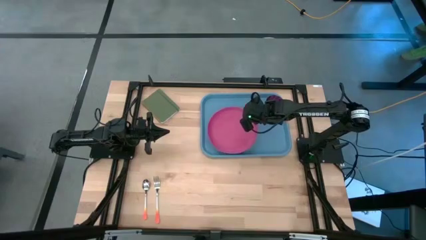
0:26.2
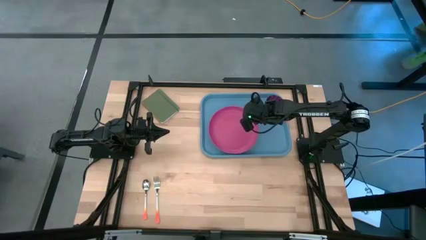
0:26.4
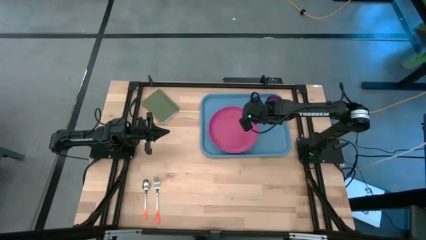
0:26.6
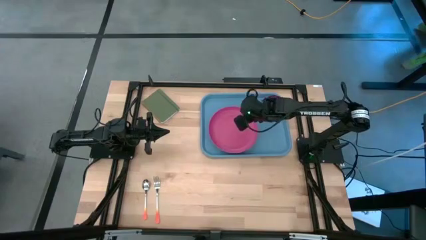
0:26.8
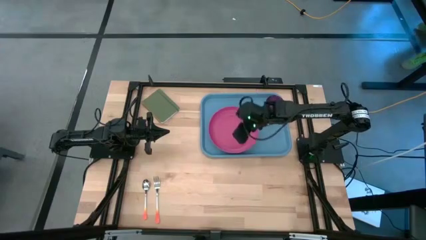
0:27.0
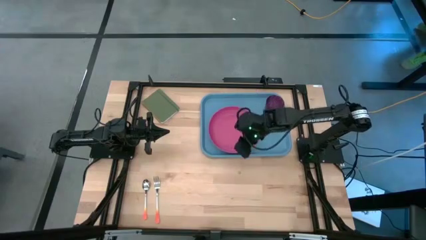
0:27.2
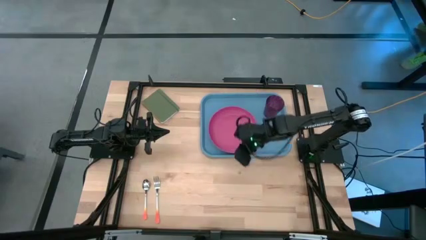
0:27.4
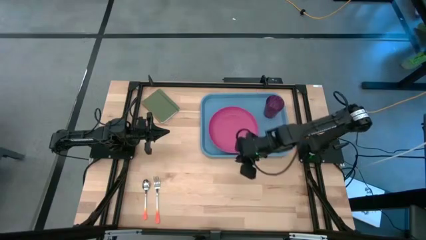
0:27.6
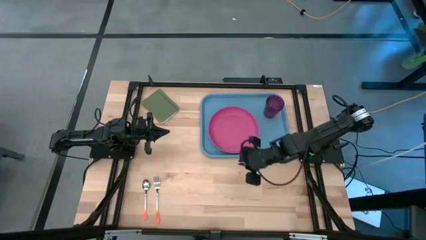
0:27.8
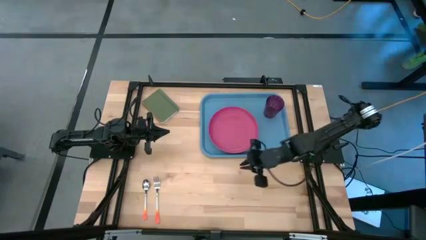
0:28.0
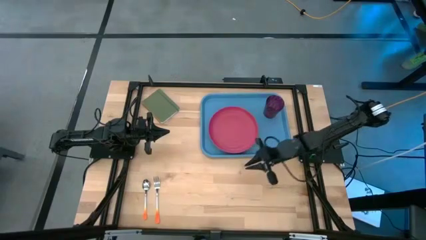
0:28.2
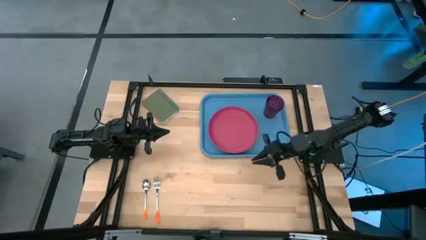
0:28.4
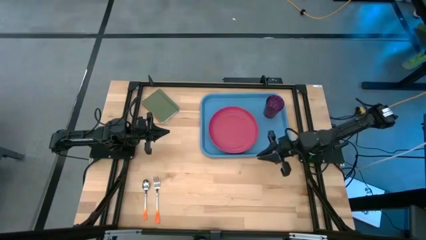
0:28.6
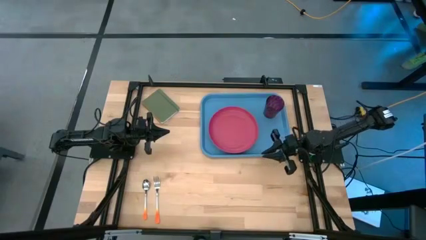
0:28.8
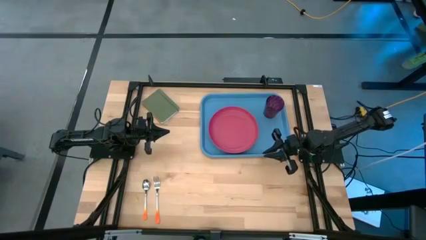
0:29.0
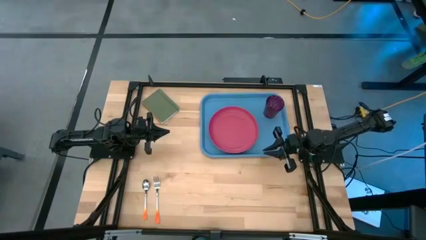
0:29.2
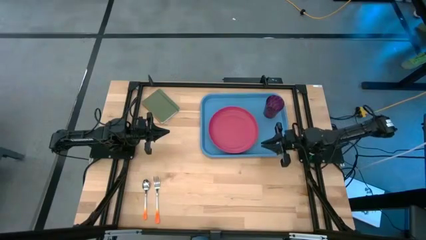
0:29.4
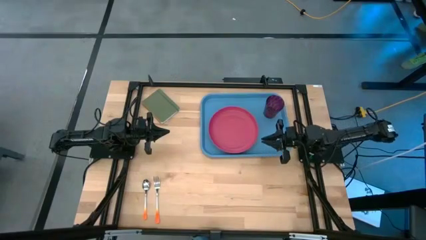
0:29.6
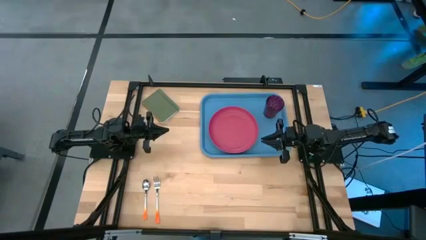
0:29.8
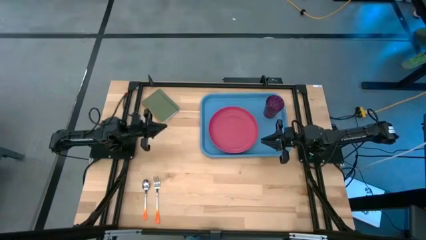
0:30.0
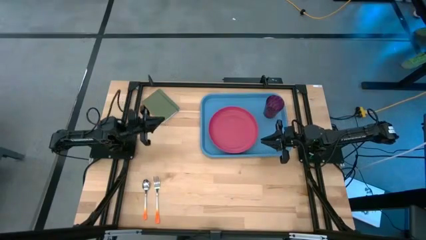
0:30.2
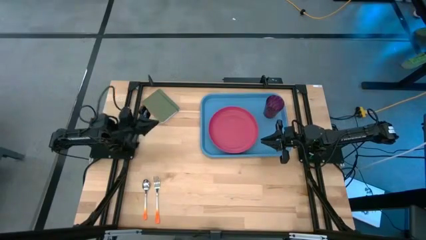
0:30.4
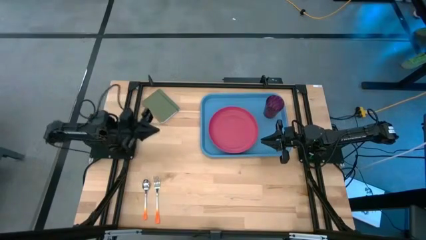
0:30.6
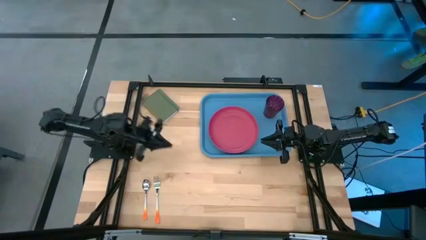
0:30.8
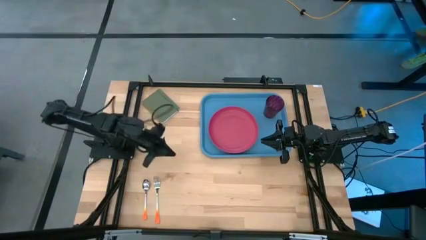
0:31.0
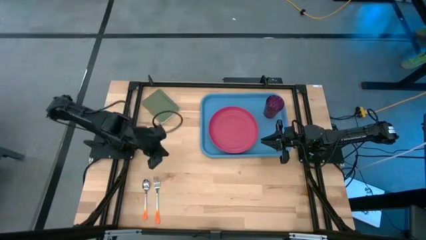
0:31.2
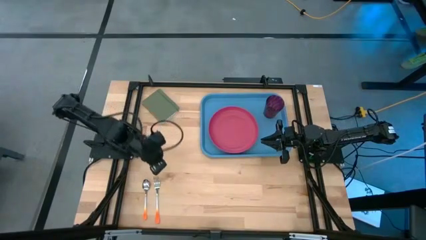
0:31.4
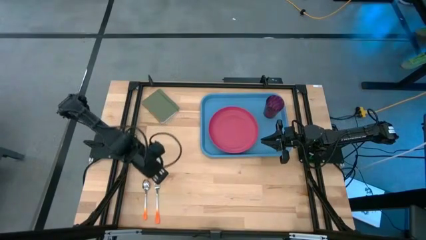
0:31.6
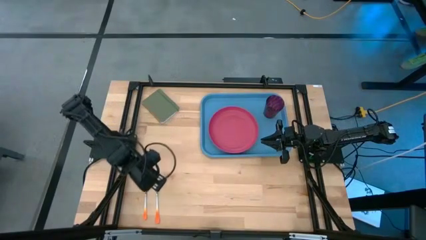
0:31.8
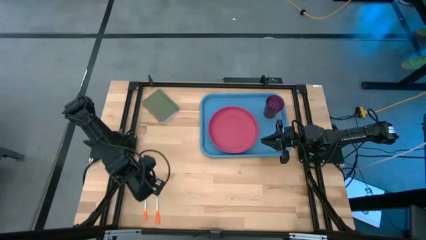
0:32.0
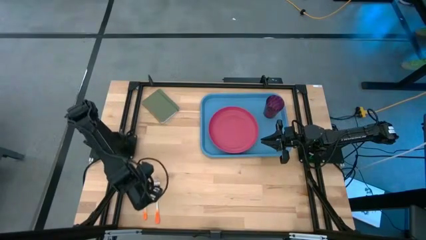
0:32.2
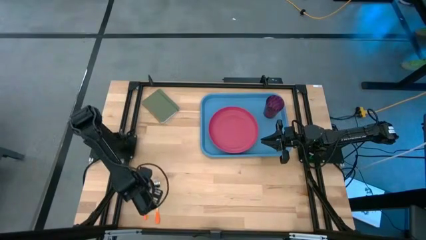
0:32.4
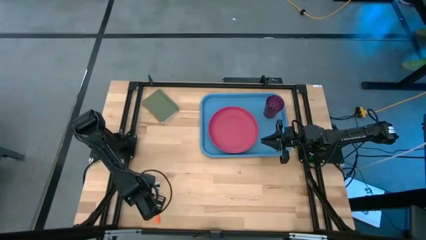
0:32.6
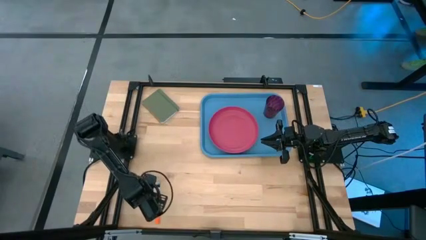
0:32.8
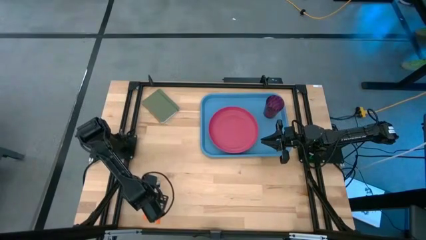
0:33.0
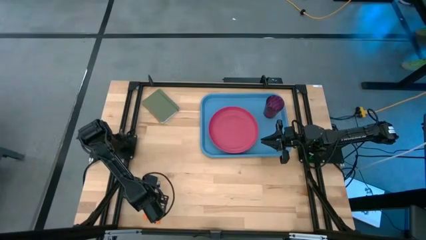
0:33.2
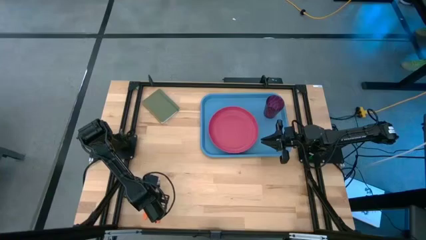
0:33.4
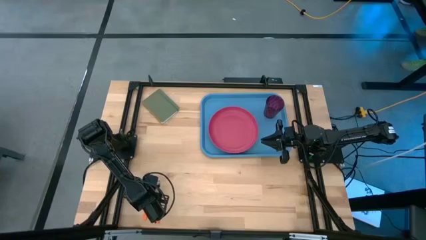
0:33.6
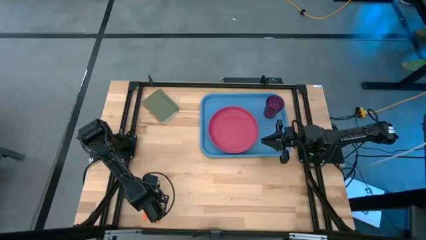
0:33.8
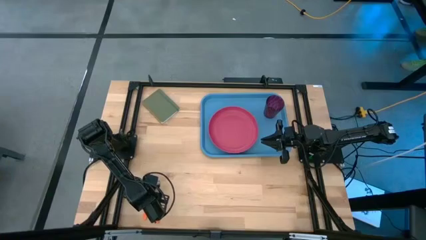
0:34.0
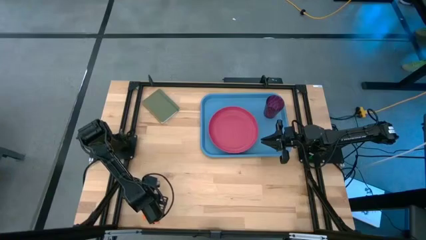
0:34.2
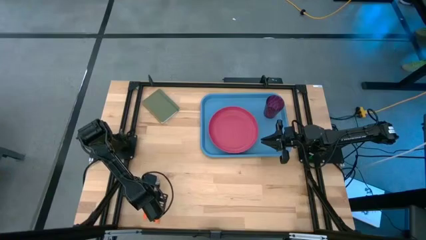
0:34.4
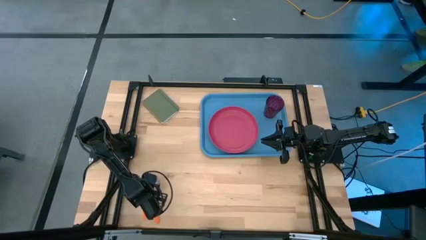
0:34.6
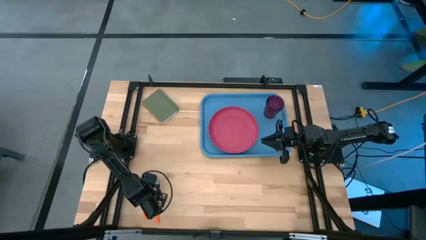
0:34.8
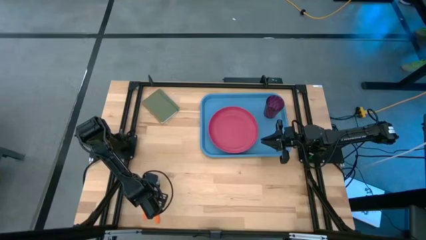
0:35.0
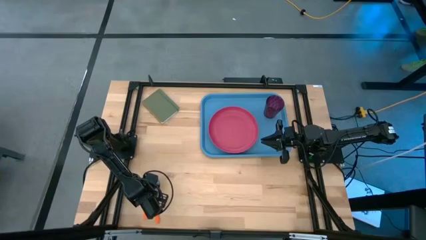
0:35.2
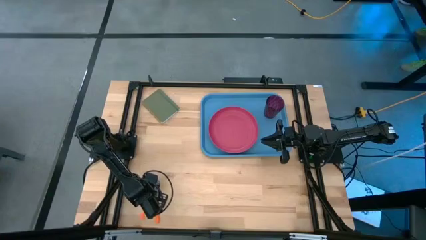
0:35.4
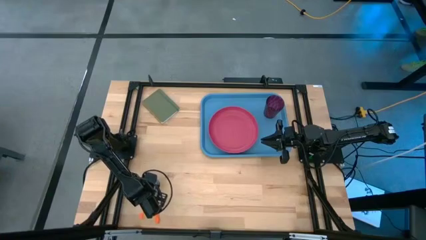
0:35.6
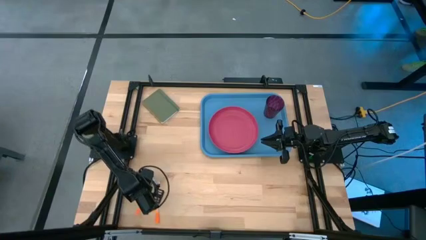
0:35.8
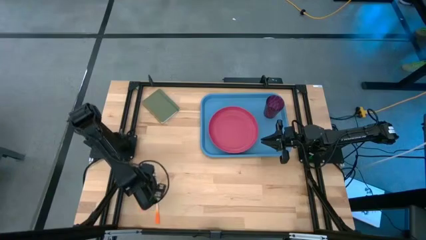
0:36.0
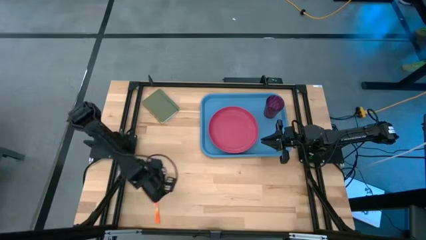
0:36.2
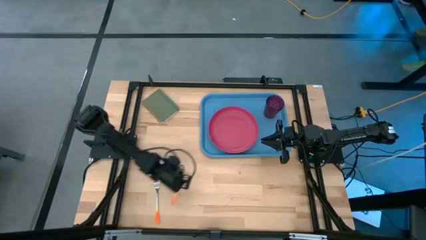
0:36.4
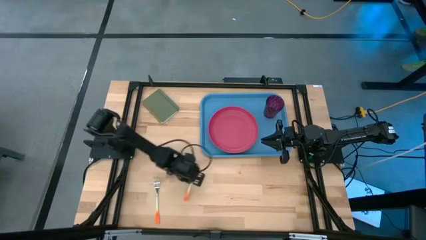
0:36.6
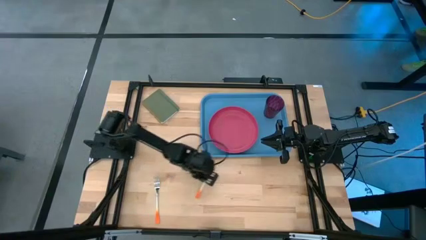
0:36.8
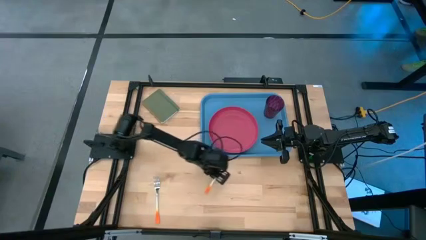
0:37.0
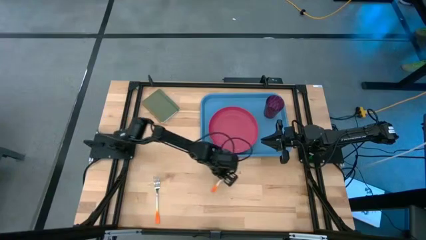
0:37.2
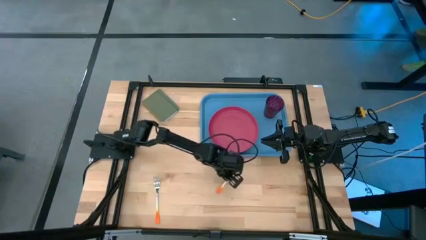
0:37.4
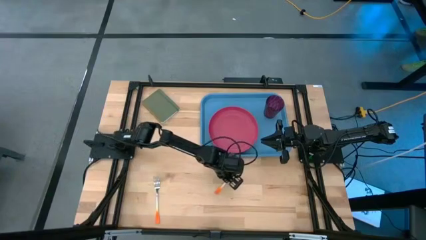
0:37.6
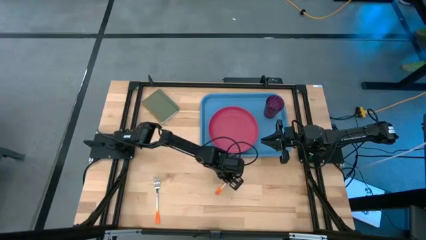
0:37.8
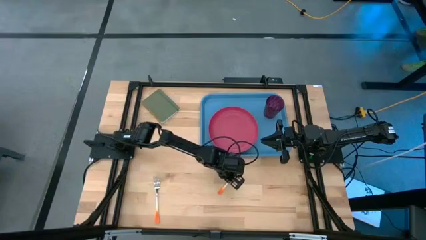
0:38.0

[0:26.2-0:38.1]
Task: Pick and place plate/cup/fork/spoon on tray
Move the orange spoon to the bottom center of the blue tray

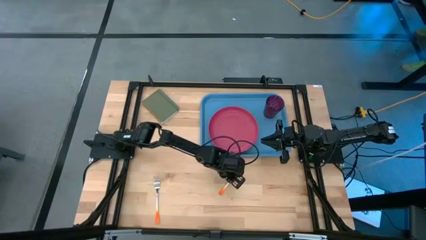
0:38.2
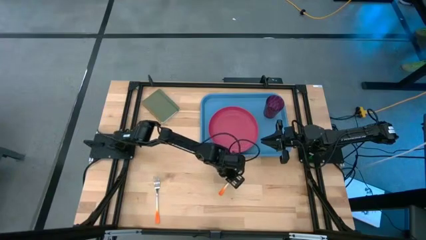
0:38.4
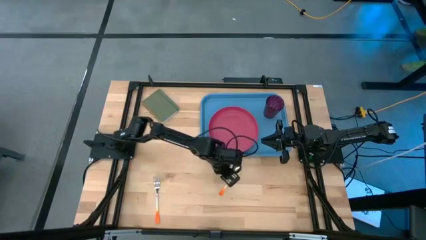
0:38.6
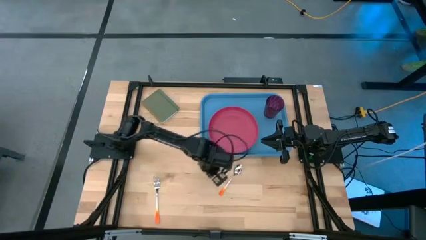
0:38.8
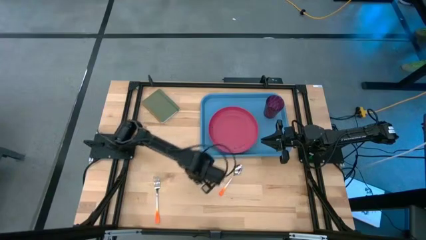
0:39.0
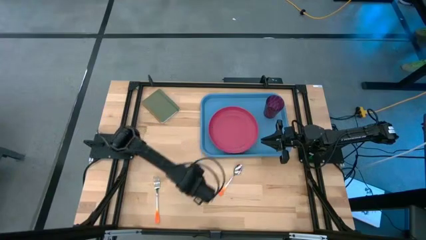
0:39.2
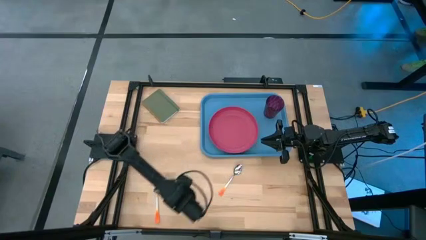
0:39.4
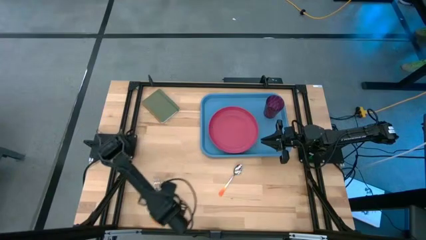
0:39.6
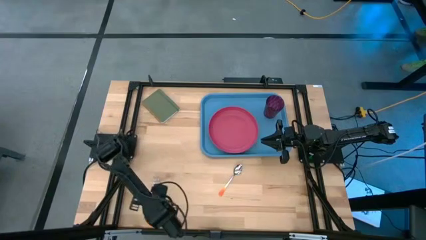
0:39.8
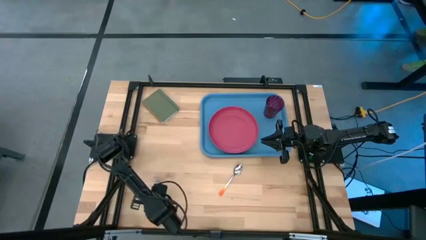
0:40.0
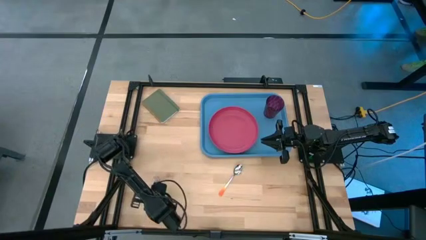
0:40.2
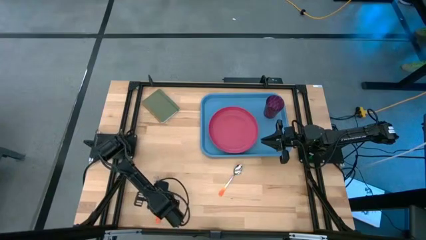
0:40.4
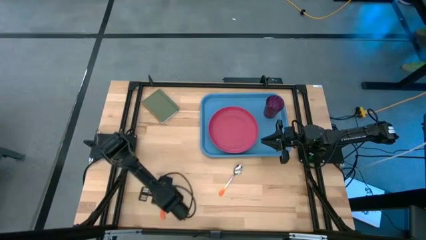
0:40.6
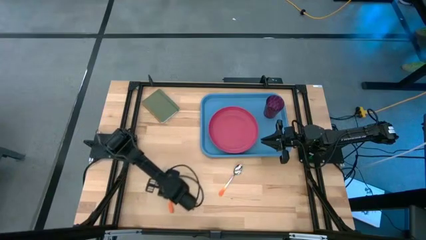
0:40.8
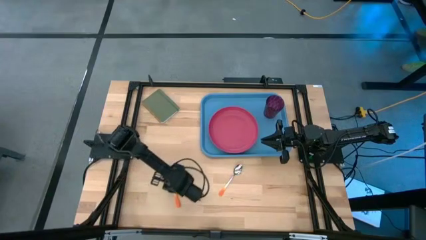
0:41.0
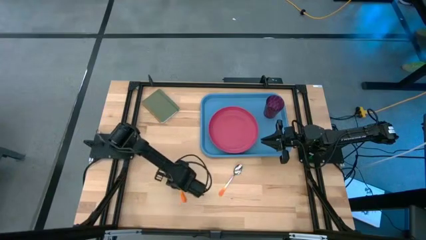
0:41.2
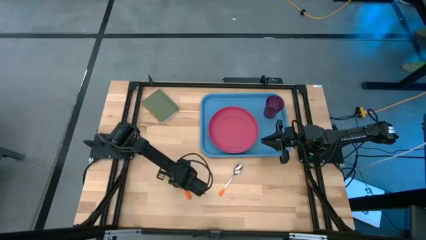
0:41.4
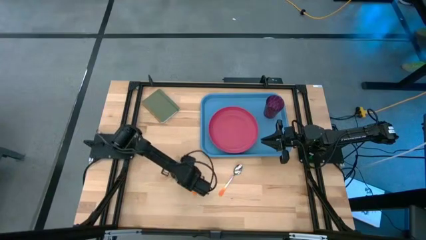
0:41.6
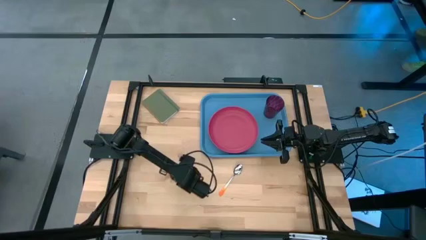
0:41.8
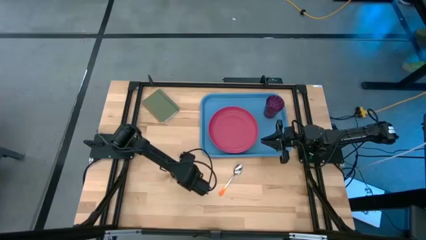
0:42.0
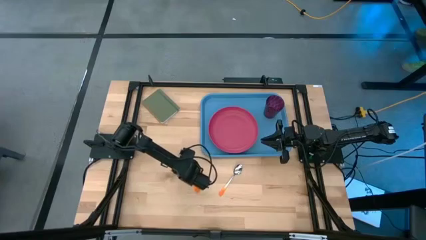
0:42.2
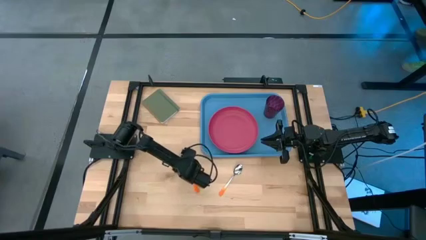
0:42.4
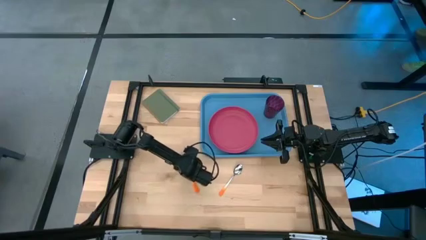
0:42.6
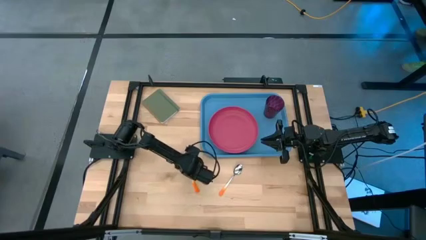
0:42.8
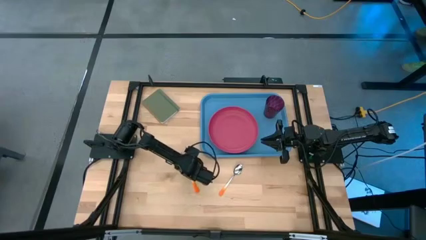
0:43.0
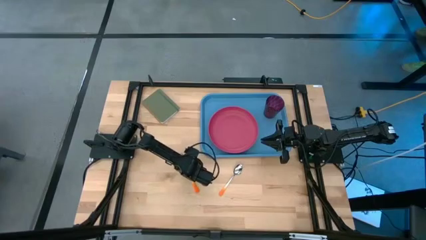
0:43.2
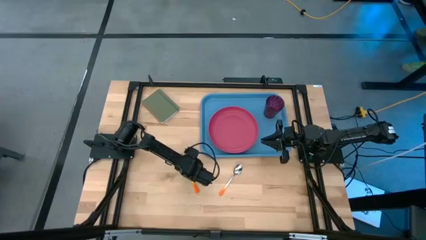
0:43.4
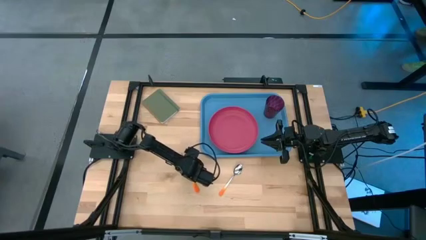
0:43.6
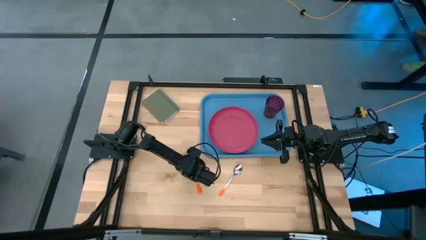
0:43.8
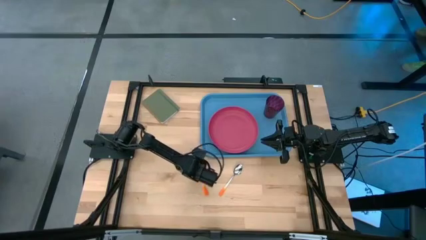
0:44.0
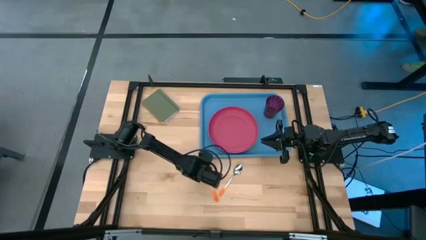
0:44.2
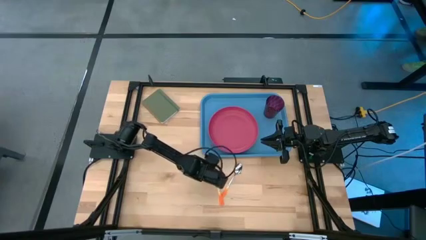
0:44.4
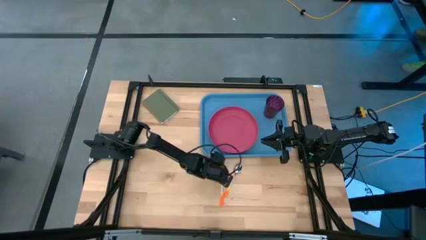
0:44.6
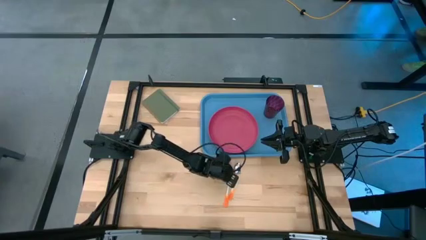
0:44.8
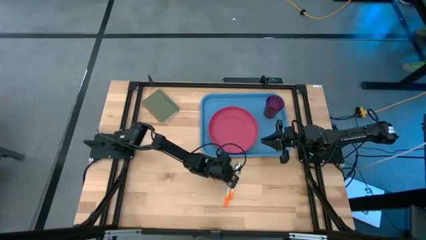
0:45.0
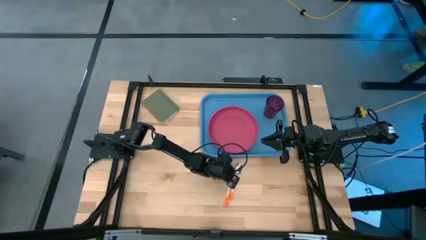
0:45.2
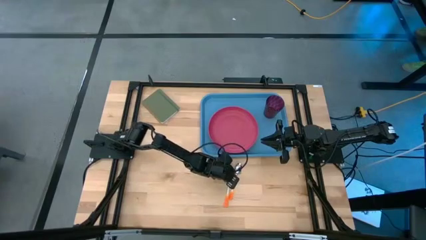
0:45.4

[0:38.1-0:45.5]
Move the orange fork beside the orange spoon
